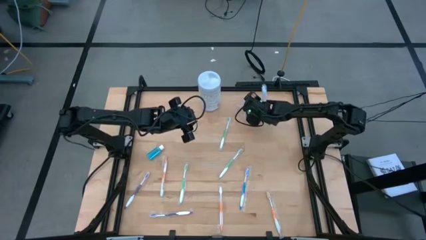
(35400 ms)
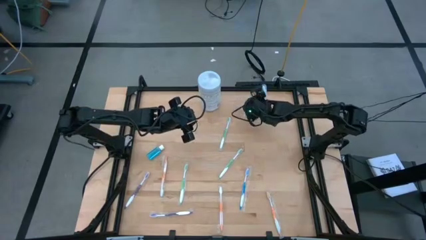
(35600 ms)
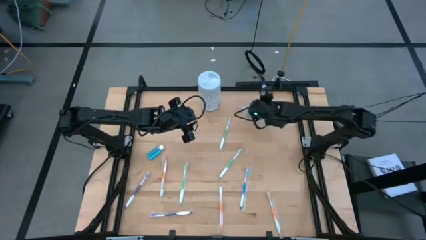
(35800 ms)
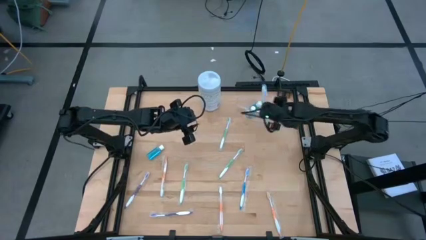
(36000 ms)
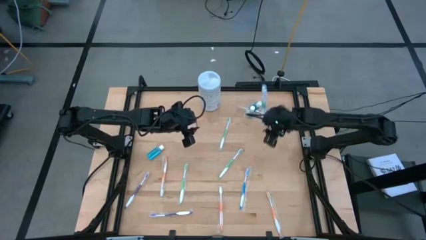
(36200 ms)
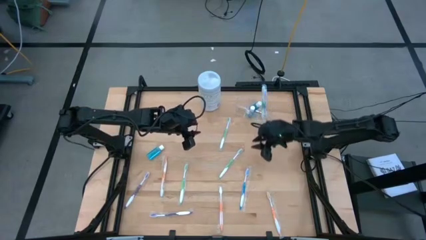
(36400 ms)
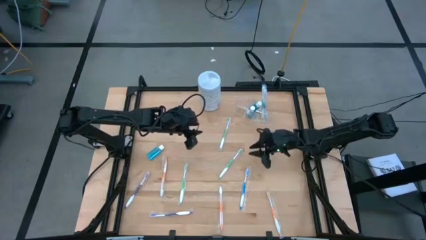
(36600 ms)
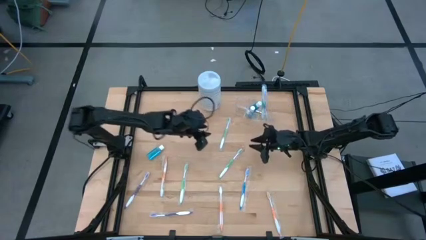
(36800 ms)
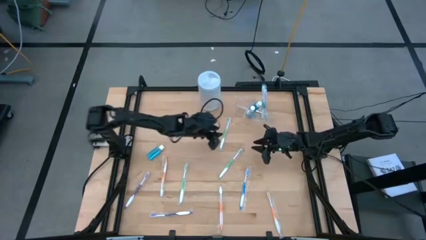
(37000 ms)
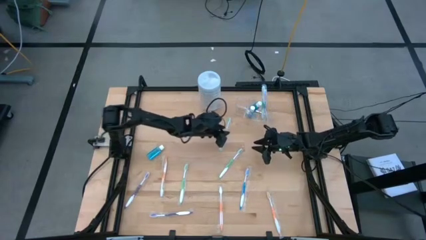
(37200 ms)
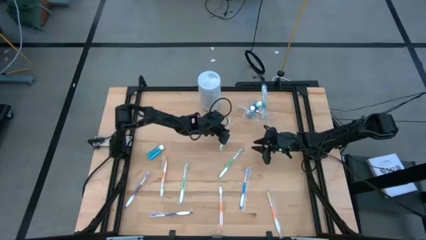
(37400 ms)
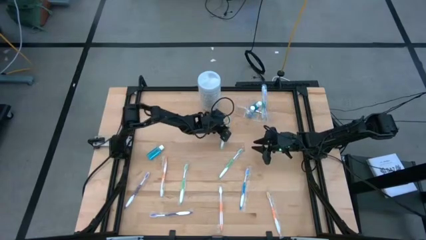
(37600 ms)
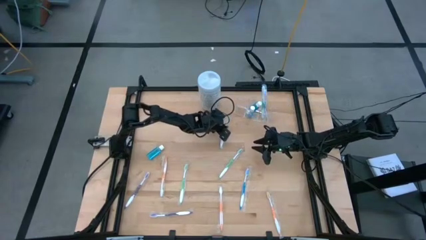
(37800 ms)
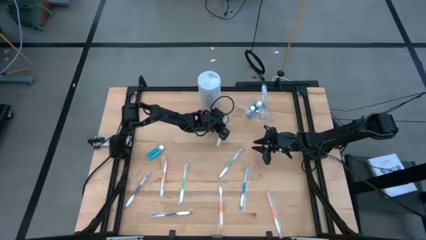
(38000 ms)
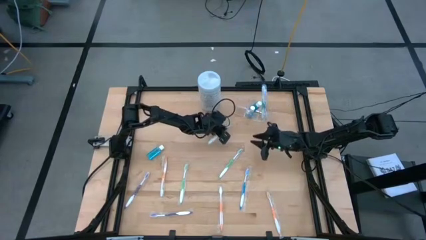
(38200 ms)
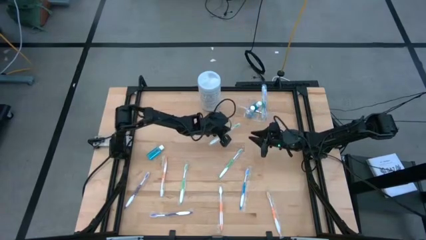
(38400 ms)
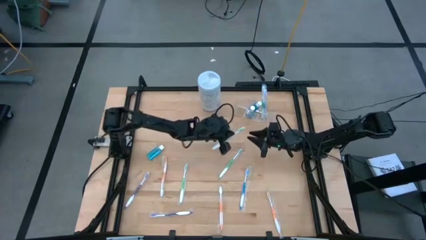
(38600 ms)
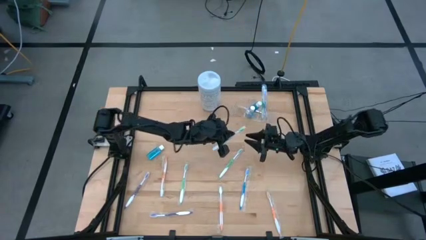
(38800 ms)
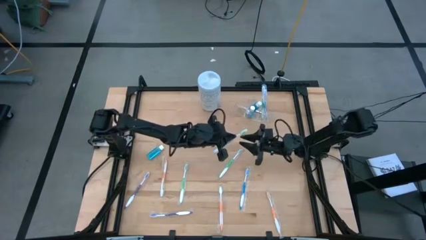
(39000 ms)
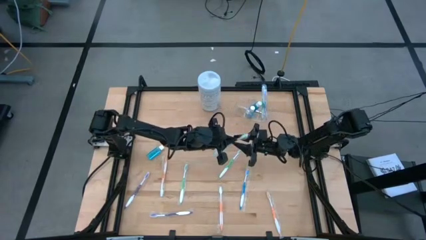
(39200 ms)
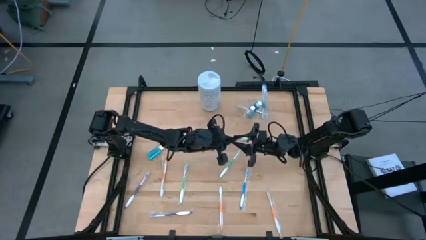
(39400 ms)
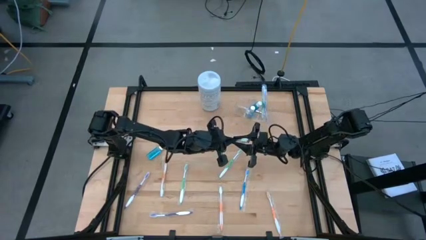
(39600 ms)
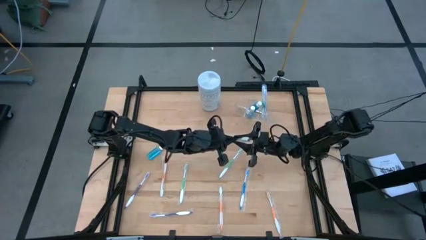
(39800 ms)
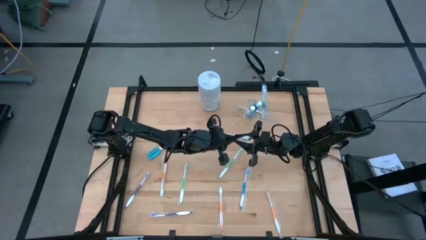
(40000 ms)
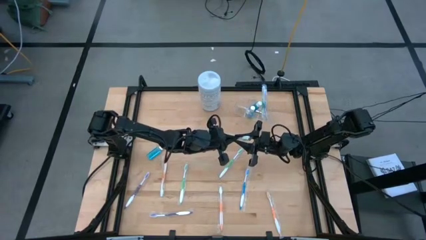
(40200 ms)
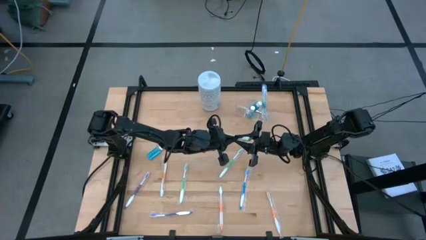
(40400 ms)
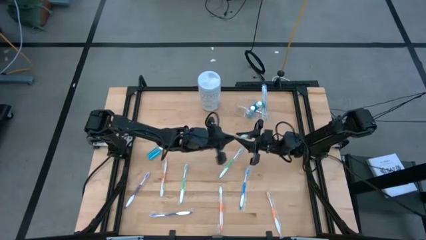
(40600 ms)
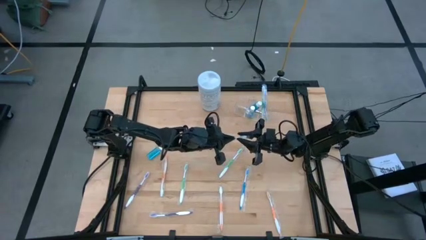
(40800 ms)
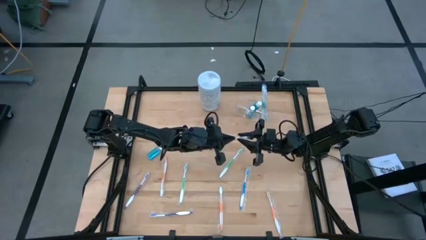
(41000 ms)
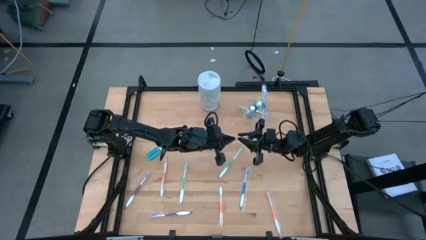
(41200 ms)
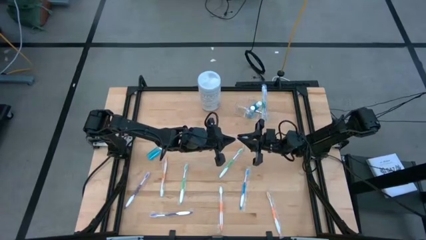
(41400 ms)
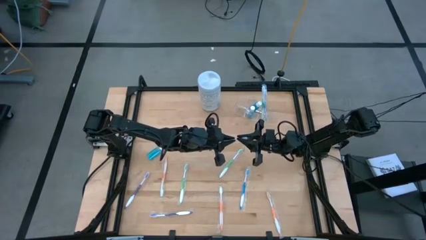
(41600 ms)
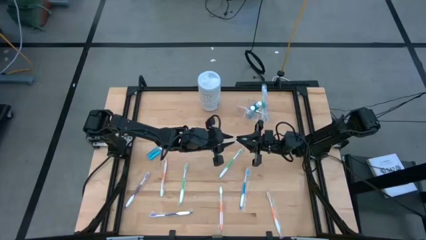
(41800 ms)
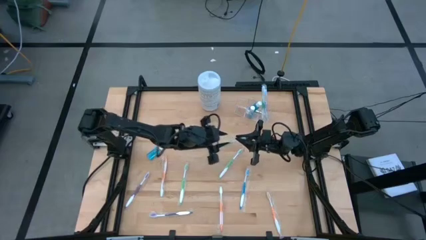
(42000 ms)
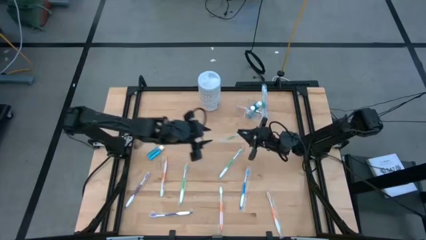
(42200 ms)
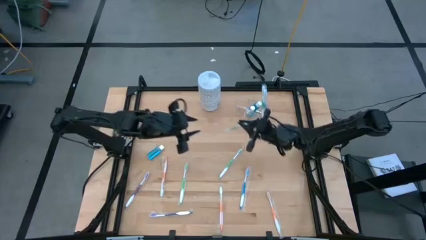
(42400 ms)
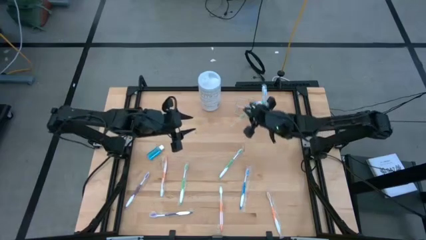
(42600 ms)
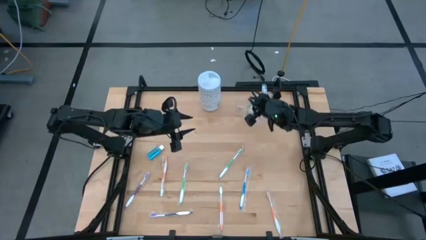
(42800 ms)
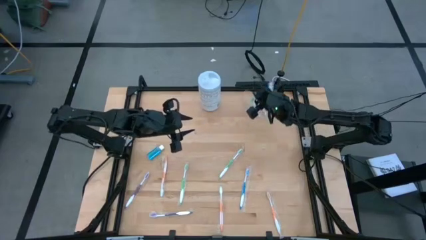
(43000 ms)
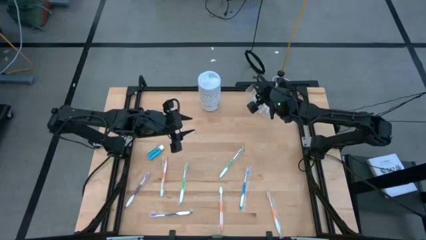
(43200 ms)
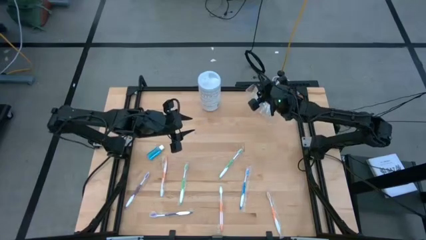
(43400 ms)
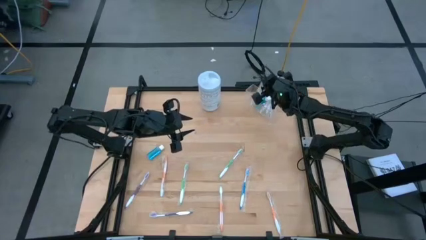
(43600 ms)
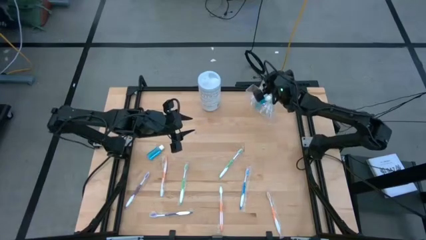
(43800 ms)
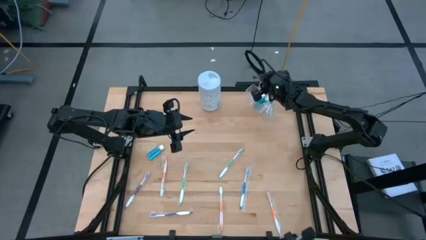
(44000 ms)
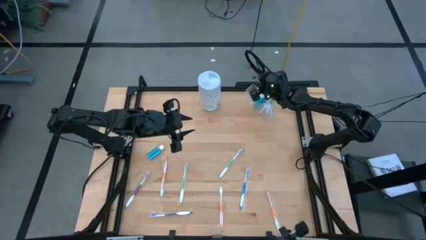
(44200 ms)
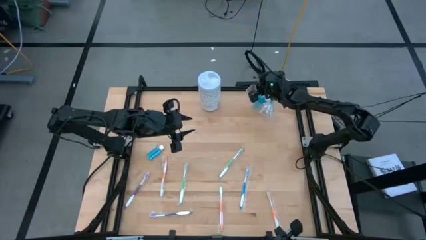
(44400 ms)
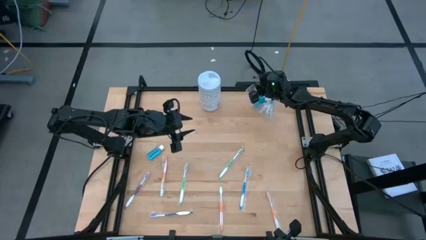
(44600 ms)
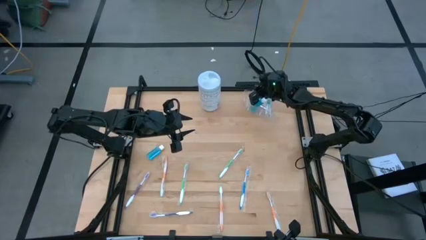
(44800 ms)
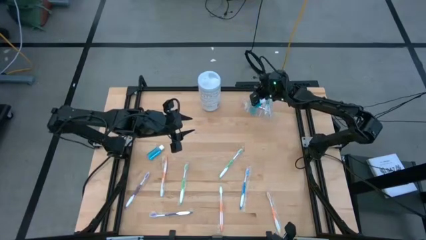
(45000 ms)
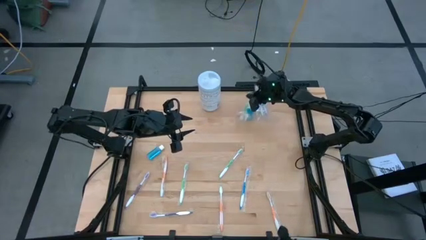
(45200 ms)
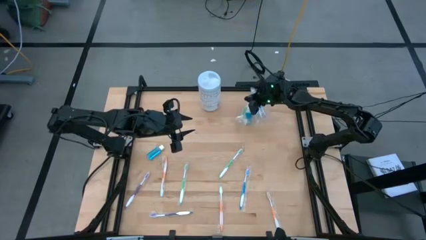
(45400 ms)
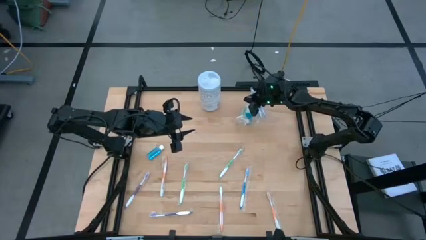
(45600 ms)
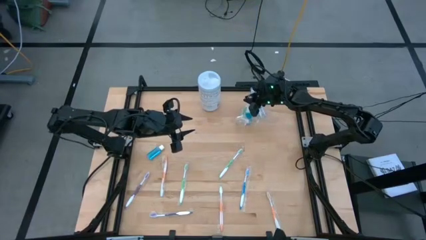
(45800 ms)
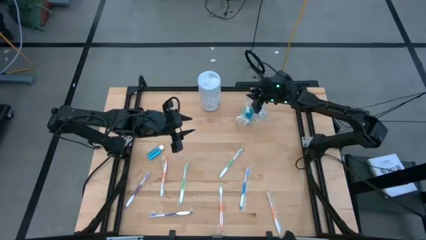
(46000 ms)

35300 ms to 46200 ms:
Task: Pick & Place toothbrushing station
Put the white and green toothbrush into the transparent mesh organizer

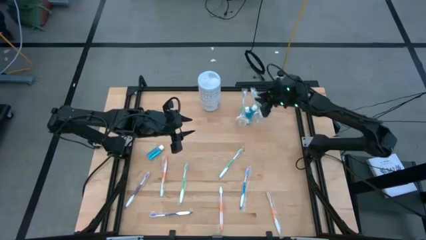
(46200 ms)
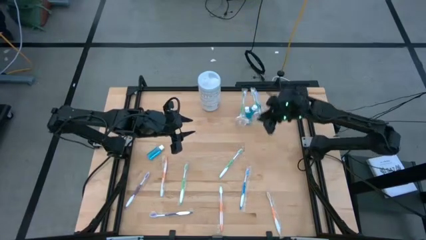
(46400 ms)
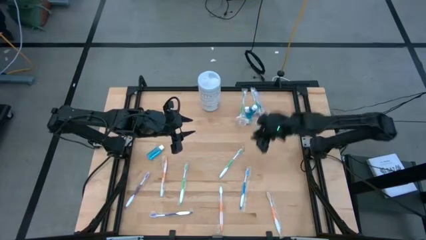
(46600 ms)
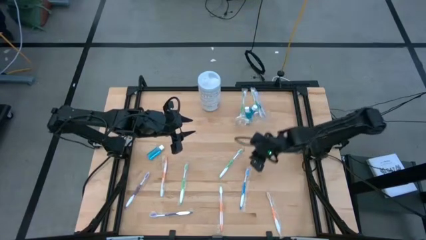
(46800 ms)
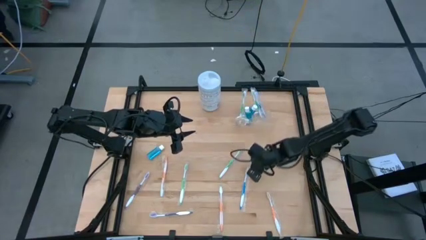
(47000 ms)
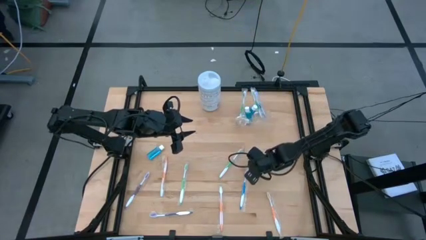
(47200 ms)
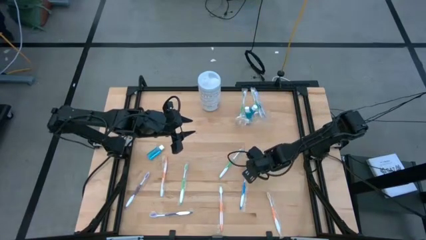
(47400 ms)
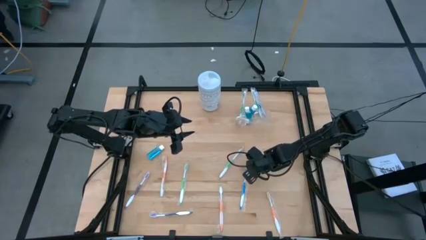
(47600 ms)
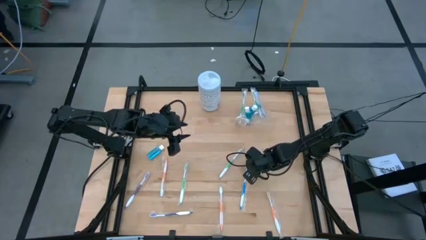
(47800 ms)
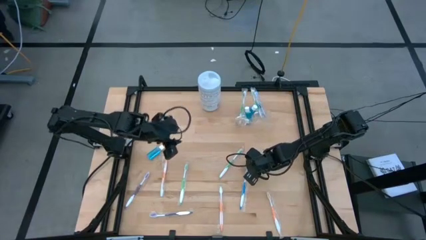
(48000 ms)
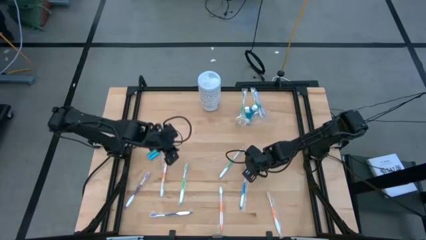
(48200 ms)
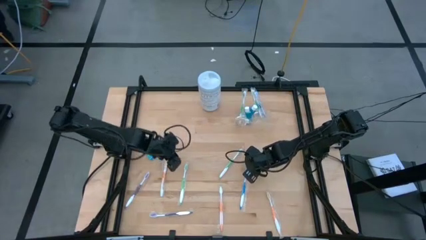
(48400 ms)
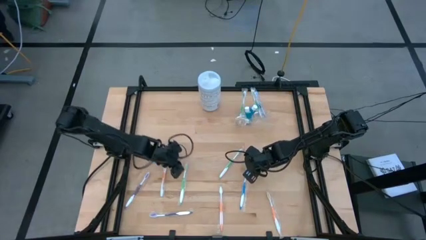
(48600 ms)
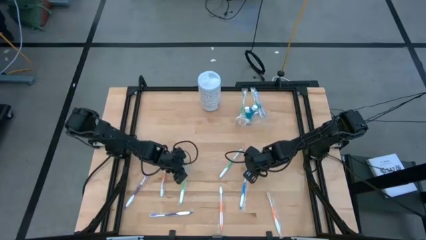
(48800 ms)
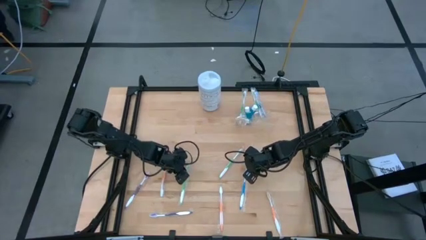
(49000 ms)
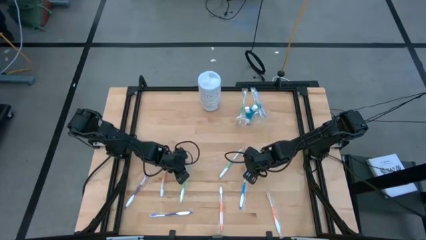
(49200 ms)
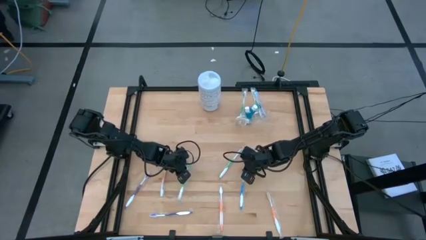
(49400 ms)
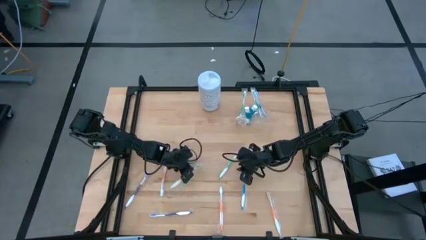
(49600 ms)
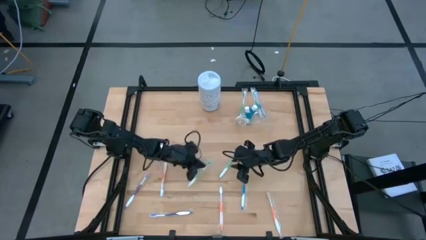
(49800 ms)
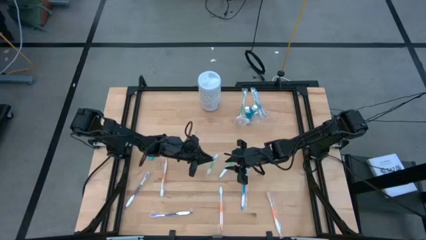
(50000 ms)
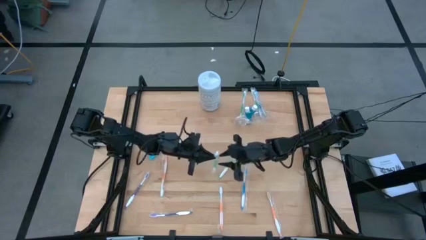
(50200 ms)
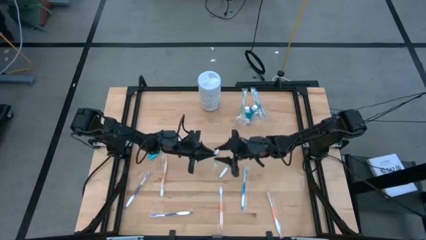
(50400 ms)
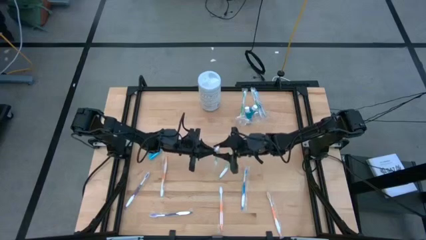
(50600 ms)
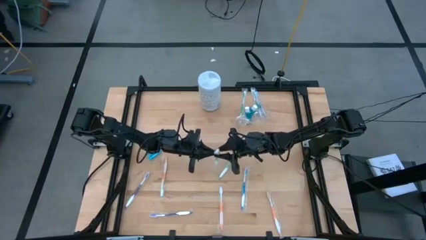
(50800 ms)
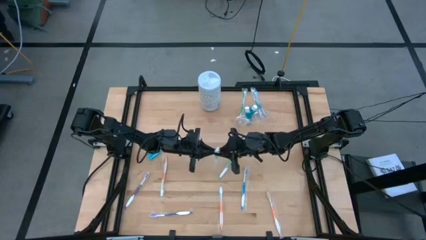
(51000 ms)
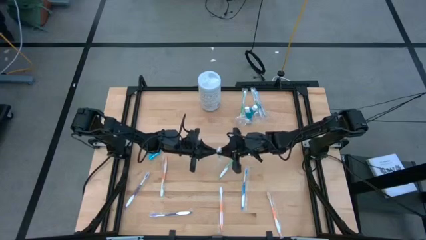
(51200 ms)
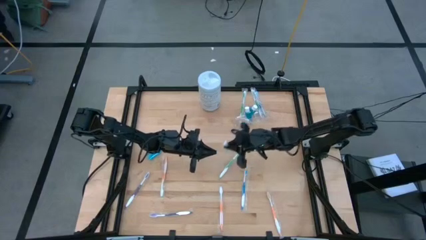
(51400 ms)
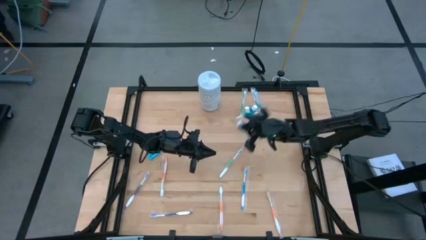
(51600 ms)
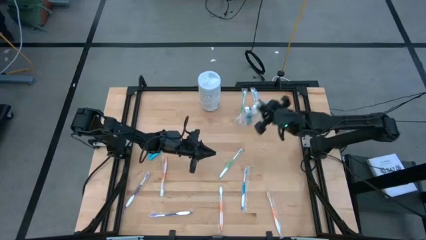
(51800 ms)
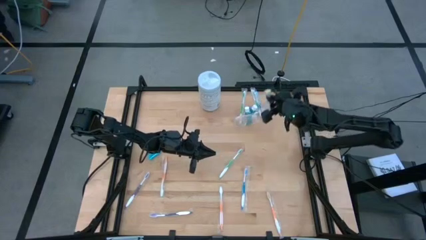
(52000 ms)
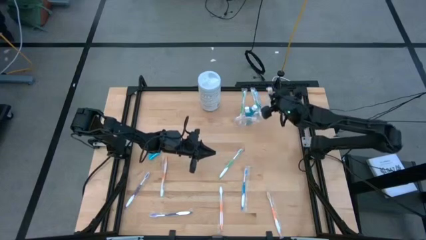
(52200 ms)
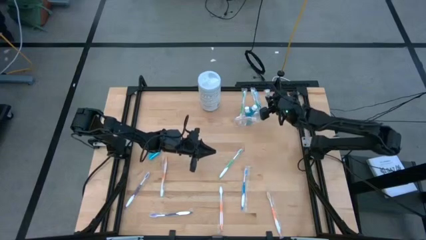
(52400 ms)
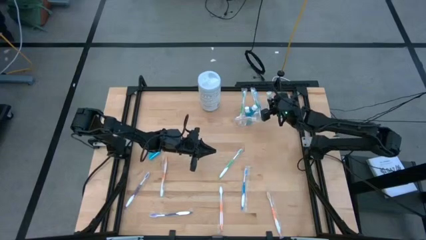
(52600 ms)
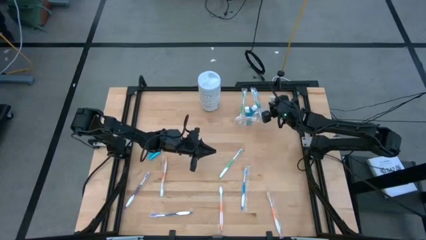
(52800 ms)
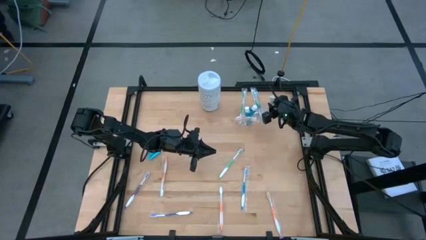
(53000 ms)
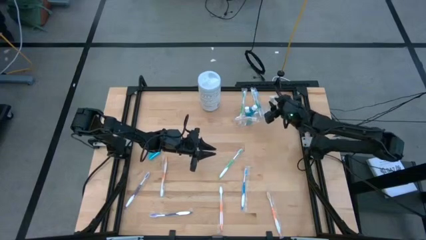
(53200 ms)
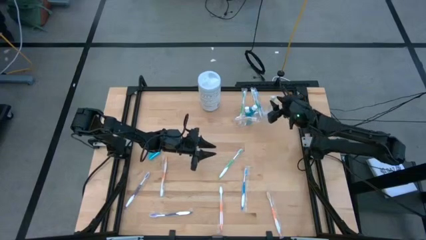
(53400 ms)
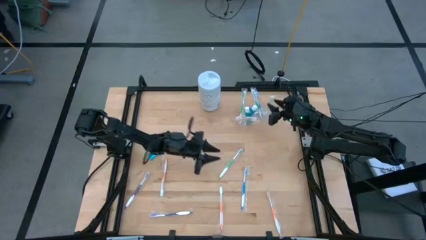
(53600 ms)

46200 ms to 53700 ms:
Put the white and green toothbrush into the transparent mesh organizer
